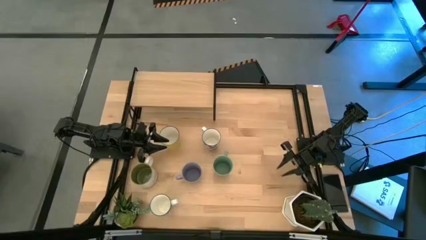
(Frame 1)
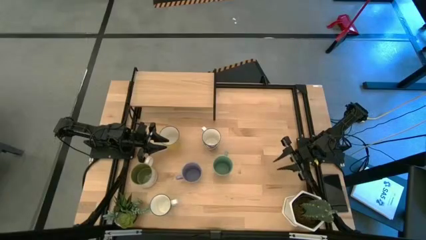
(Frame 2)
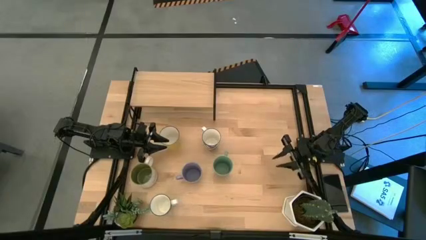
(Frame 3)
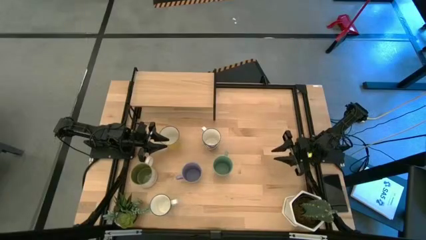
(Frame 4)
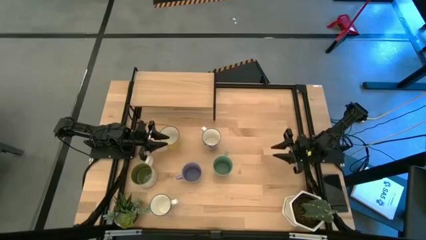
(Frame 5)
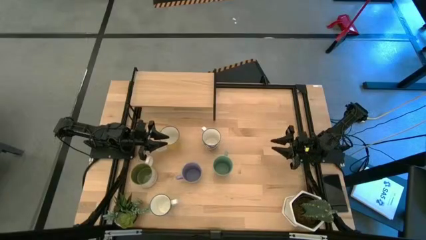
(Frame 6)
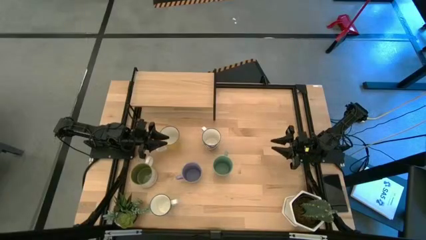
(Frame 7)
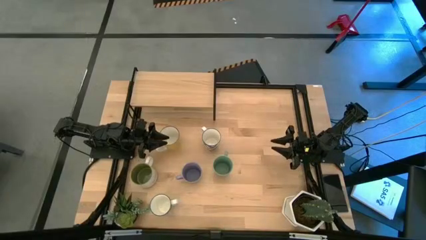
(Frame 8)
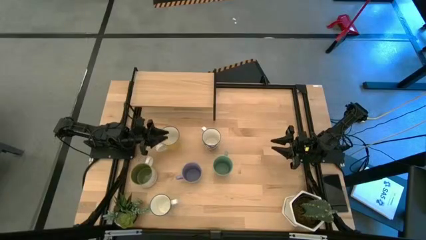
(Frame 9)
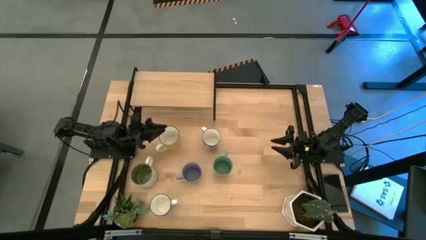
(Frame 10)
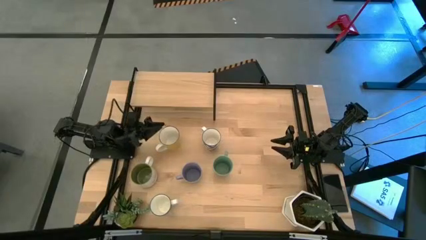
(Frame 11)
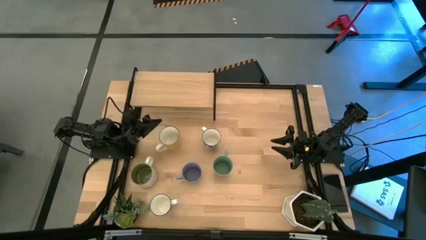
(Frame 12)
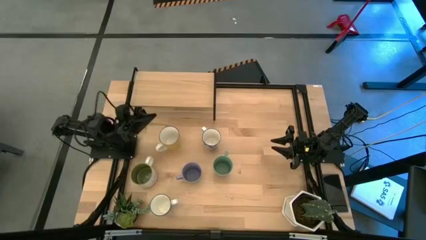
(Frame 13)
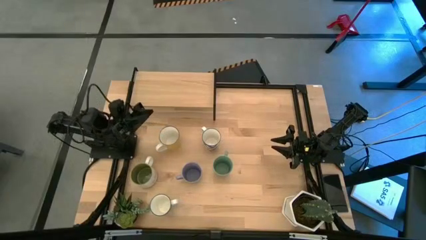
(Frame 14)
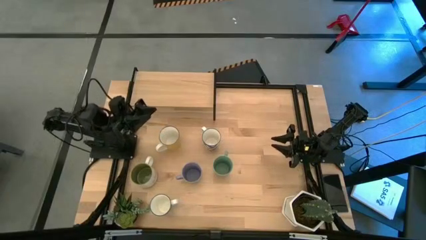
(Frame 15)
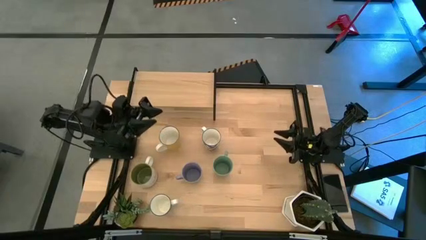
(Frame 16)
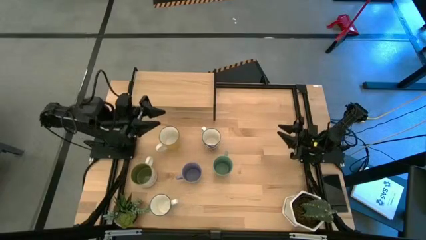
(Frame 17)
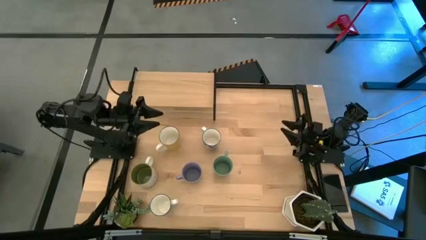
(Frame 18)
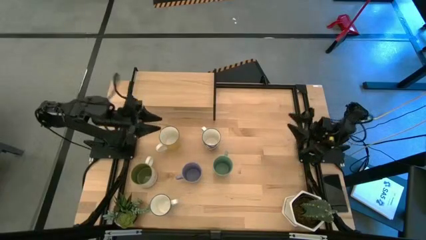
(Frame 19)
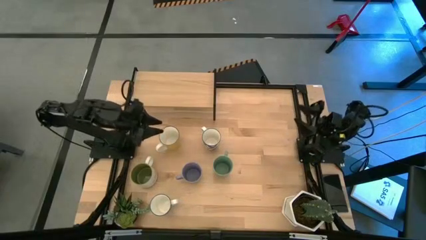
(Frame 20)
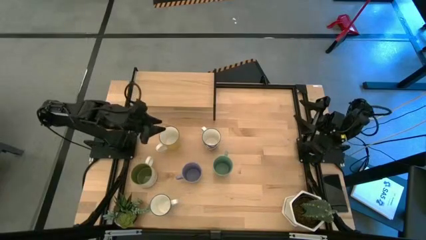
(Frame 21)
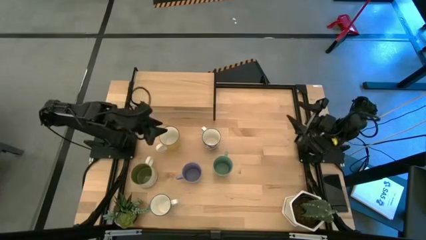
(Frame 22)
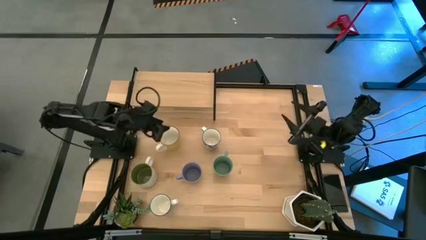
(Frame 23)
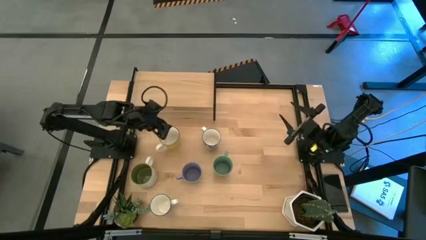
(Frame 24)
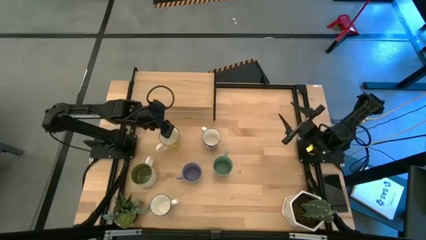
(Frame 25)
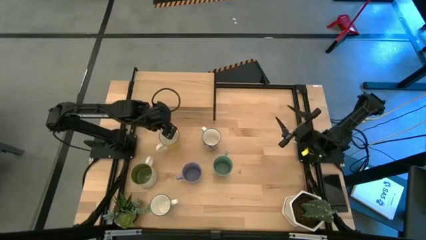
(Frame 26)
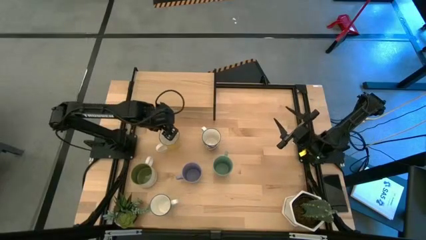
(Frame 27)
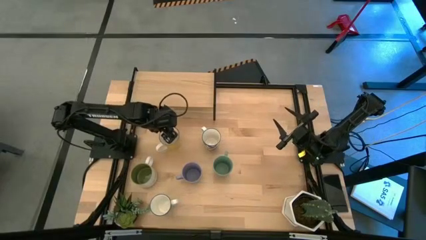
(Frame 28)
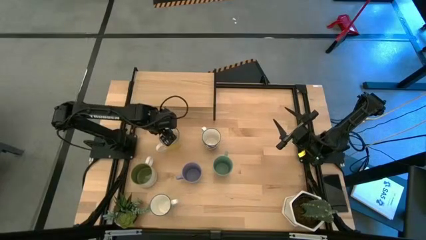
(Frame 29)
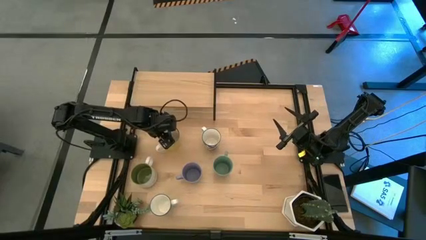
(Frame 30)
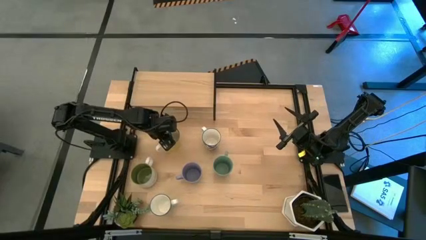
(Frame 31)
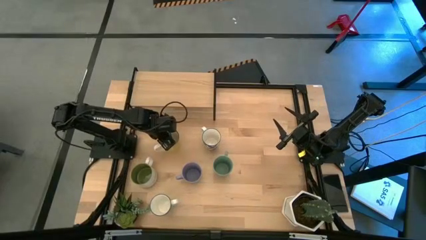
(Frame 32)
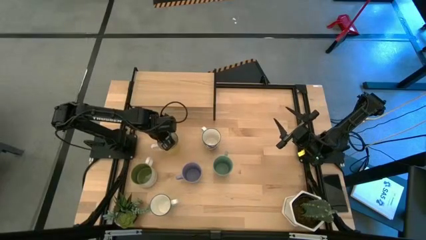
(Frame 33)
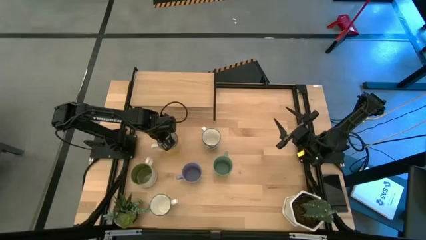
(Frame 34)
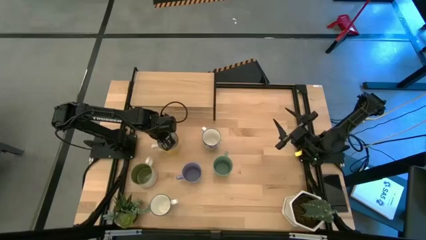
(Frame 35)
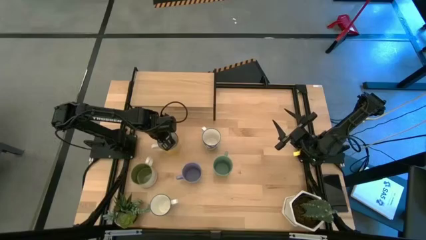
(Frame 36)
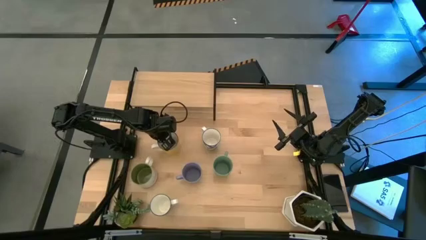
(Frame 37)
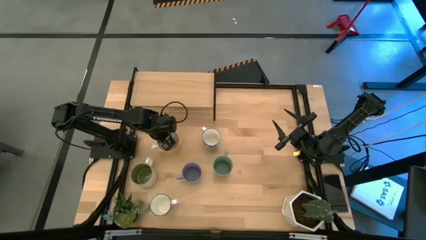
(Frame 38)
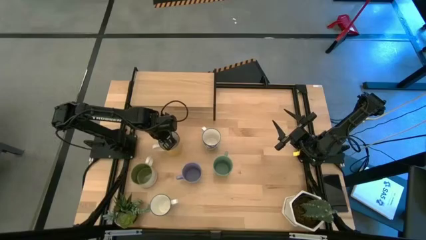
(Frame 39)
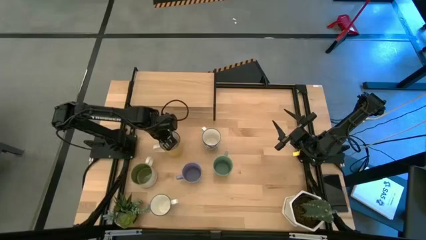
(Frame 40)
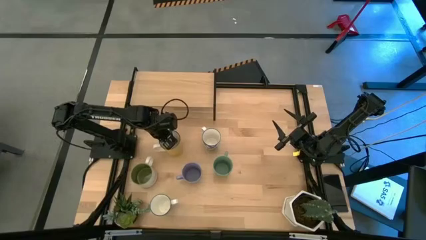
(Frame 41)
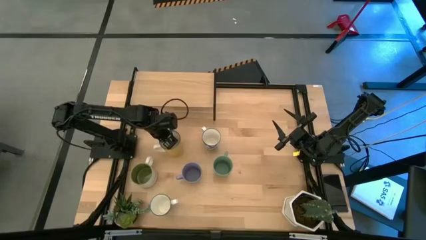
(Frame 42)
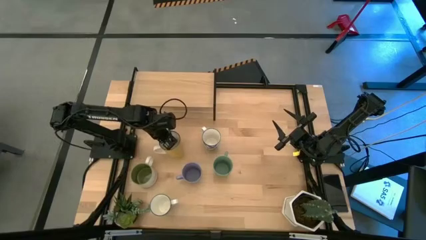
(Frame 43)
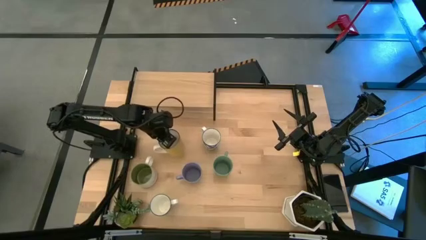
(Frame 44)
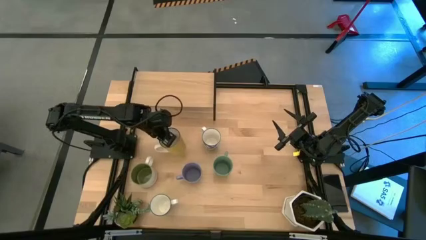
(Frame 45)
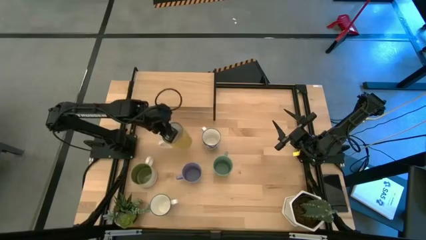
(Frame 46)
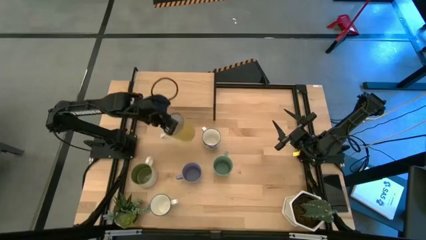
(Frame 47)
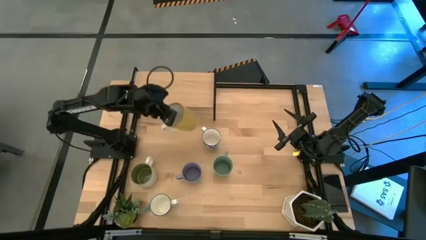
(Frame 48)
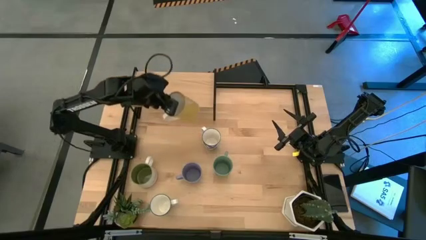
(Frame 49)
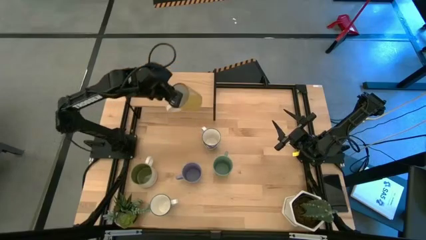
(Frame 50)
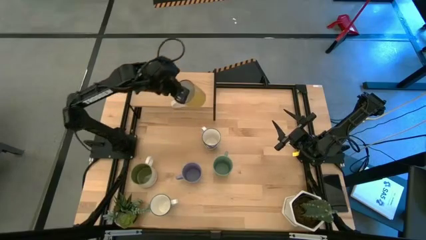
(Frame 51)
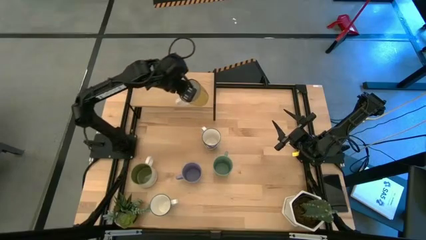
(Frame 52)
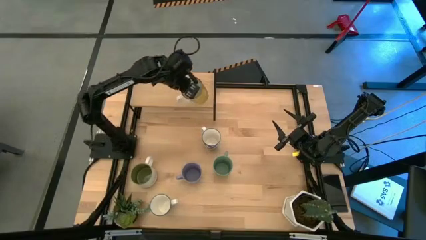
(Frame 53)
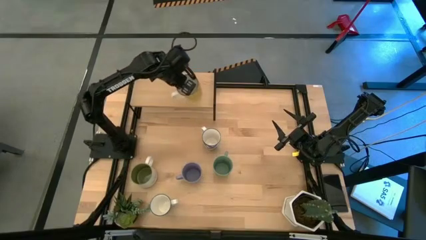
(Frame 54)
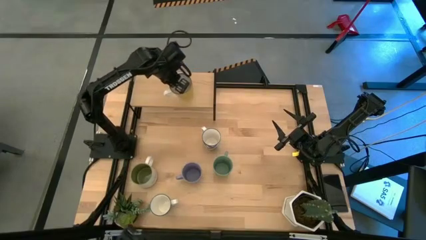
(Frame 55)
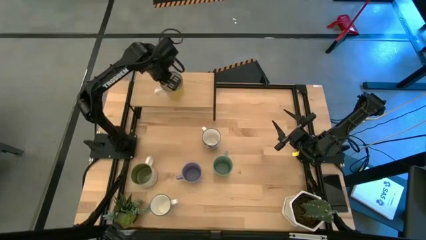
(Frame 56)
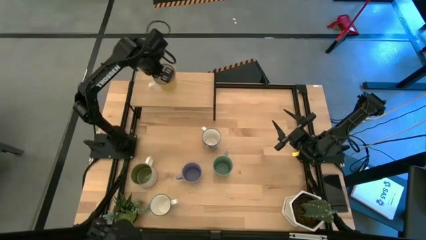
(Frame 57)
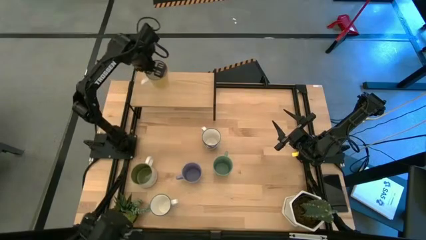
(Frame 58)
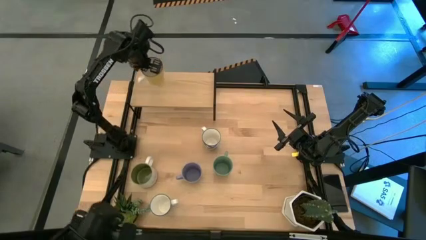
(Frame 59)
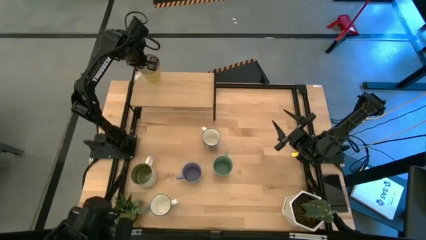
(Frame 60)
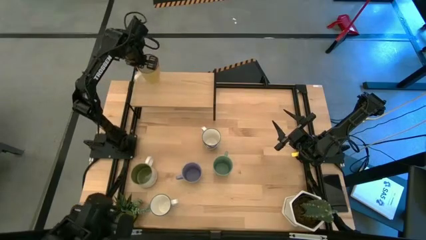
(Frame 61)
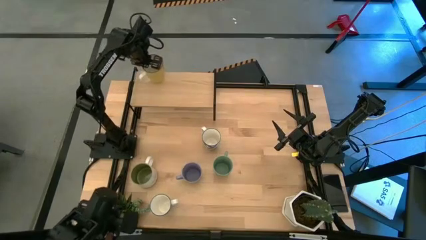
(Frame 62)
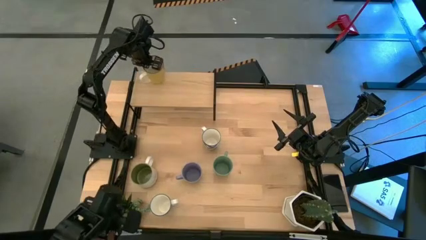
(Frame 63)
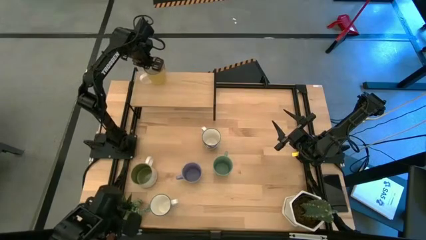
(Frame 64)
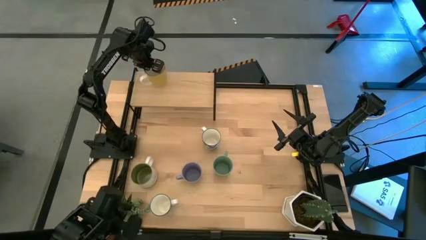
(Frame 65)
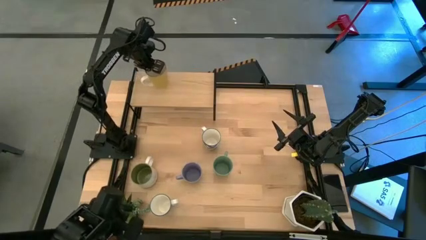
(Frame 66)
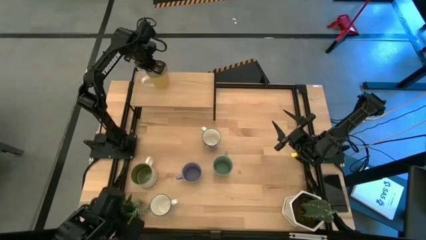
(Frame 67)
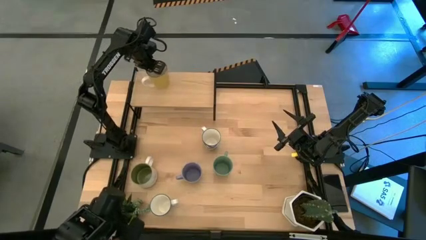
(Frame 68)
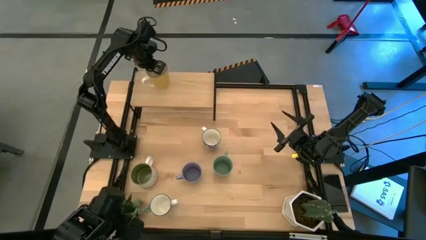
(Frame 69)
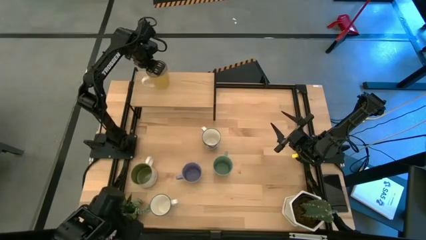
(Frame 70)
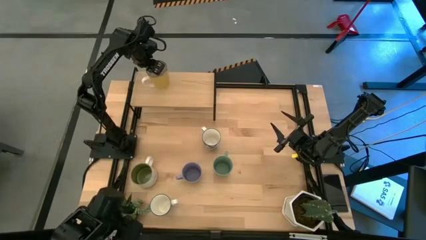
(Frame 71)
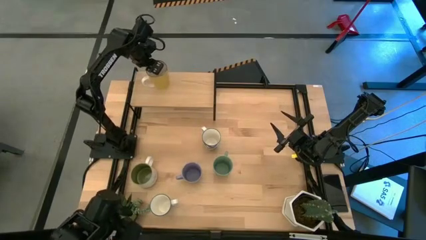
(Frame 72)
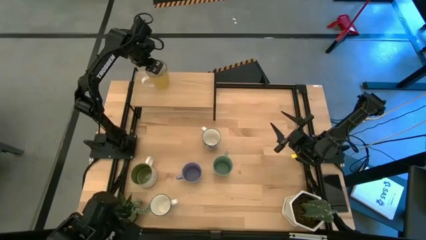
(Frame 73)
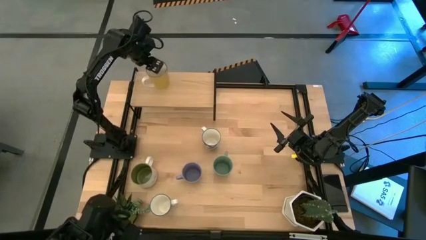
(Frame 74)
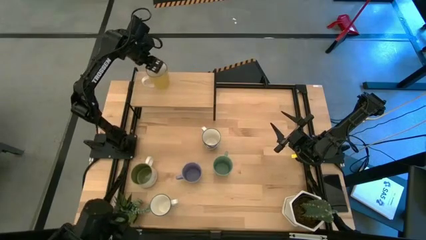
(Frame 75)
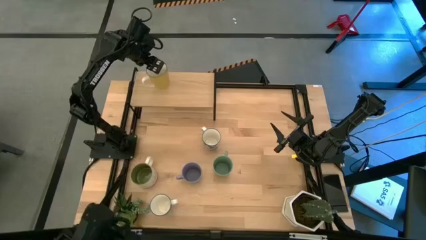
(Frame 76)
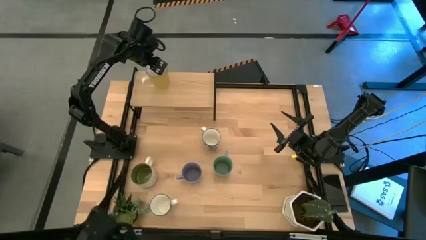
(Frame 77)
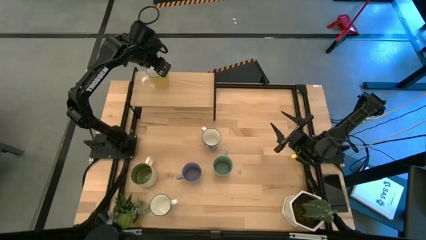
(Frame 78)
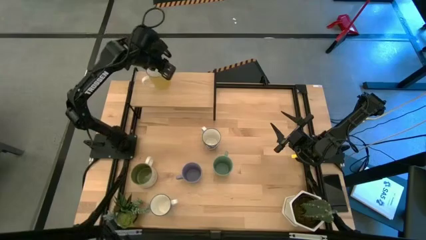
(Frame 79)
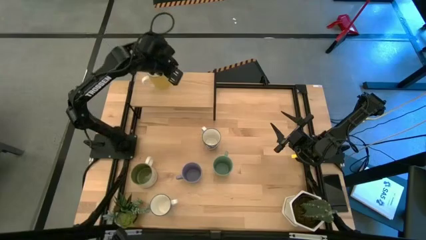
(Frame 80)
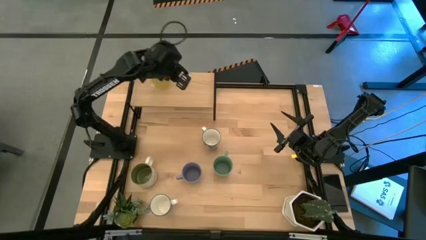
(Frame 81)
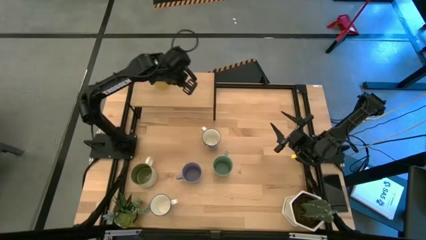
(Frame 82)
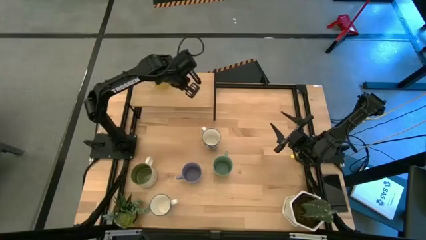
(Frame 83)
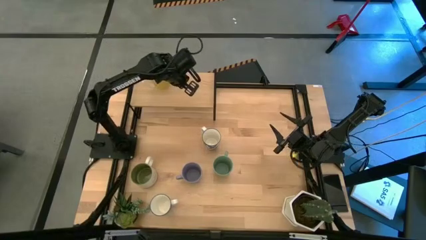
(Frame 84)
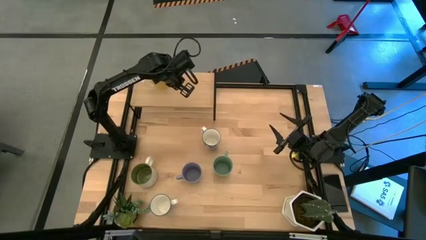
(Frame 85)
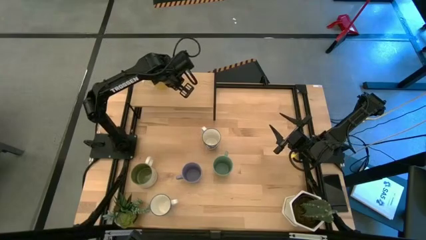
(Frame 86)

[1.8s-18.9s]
Task: Place coffee mugs
Put the yellow cup on the shelf
